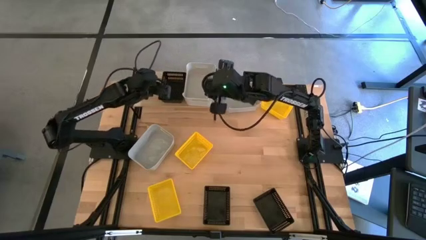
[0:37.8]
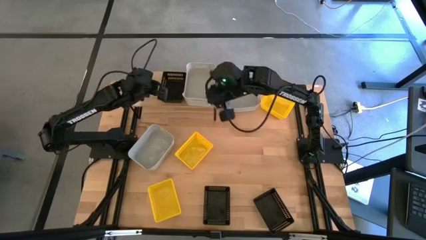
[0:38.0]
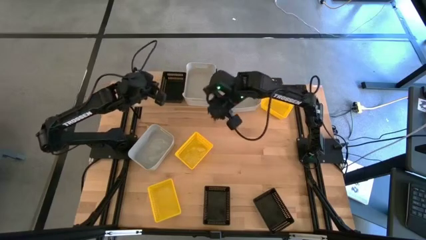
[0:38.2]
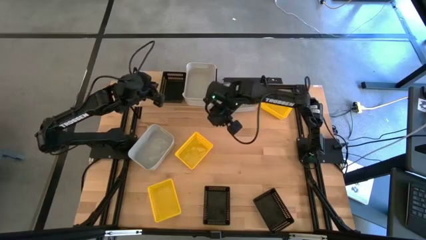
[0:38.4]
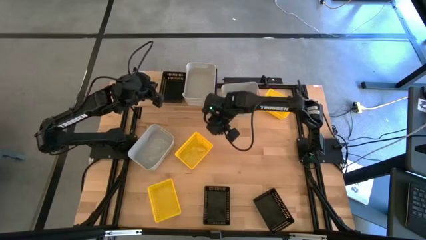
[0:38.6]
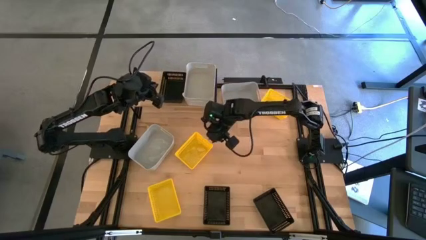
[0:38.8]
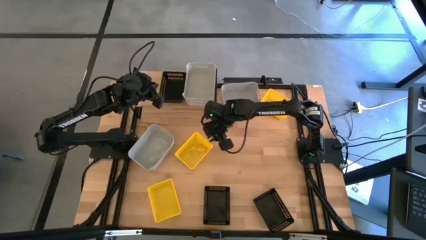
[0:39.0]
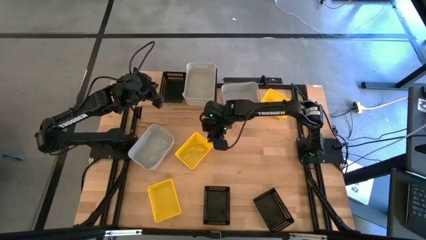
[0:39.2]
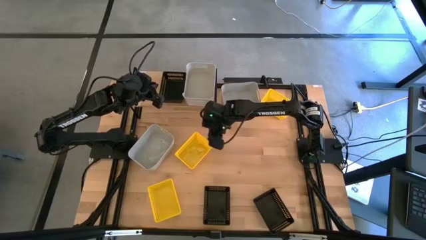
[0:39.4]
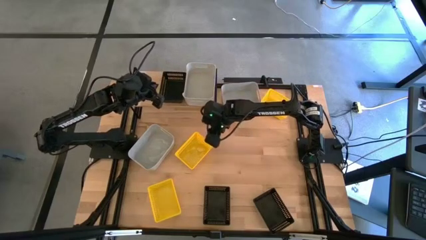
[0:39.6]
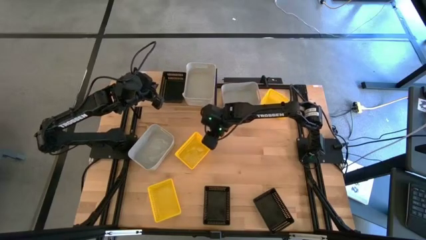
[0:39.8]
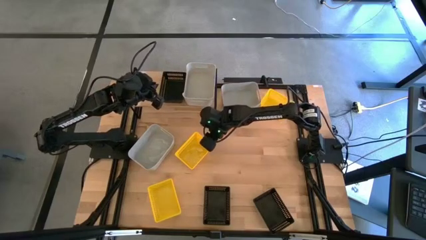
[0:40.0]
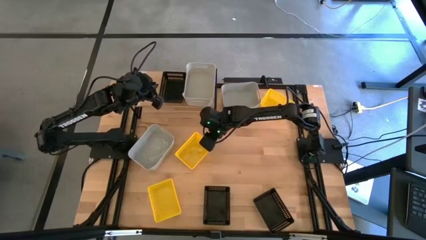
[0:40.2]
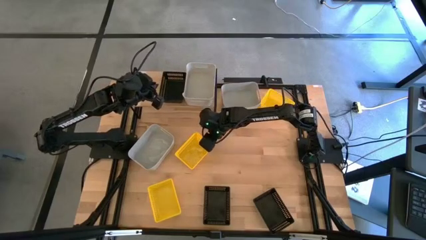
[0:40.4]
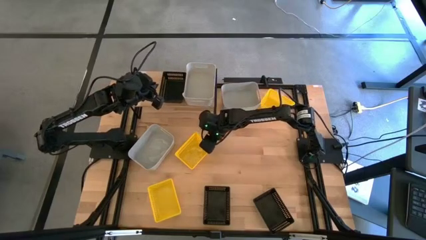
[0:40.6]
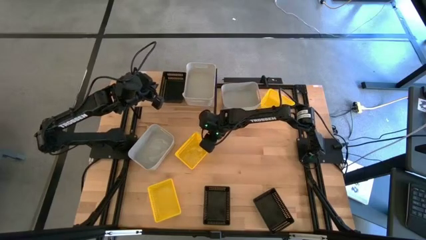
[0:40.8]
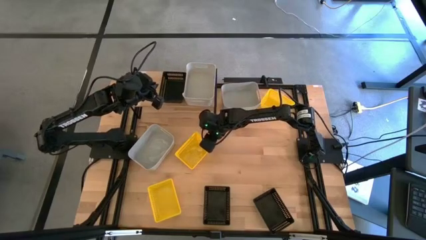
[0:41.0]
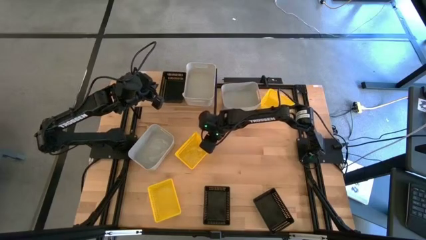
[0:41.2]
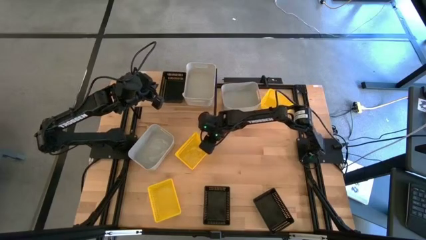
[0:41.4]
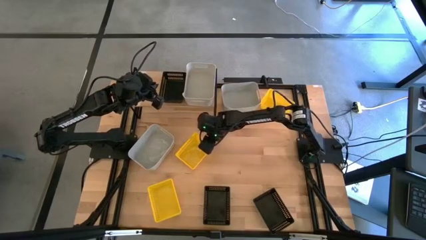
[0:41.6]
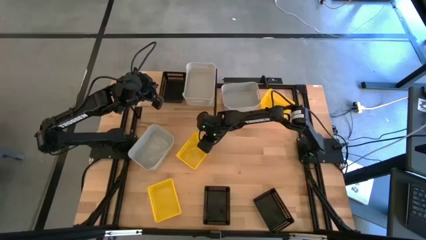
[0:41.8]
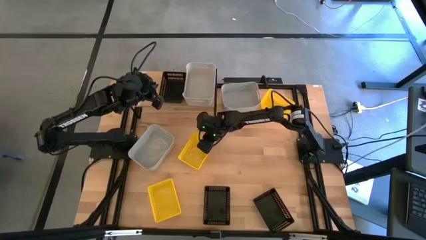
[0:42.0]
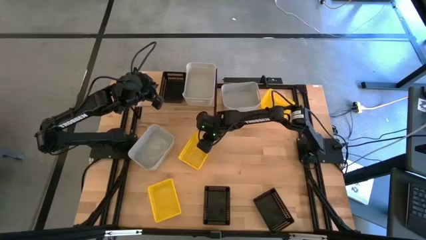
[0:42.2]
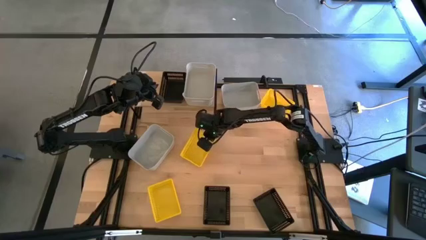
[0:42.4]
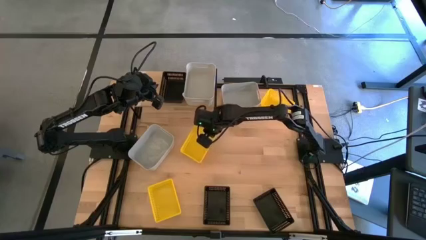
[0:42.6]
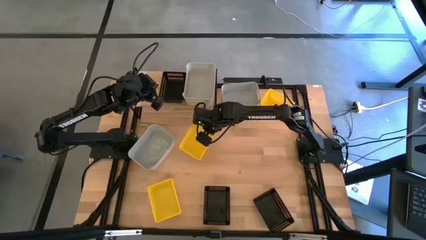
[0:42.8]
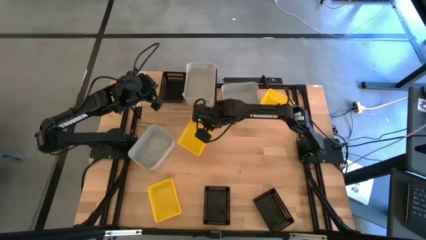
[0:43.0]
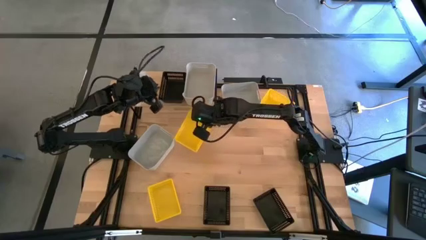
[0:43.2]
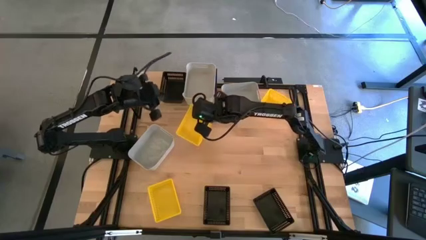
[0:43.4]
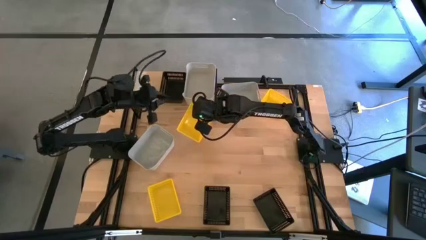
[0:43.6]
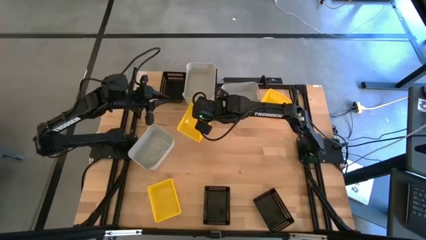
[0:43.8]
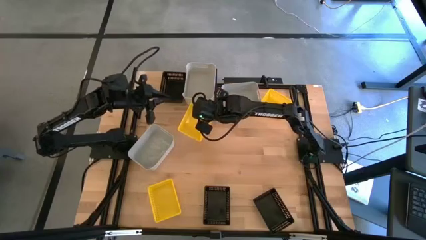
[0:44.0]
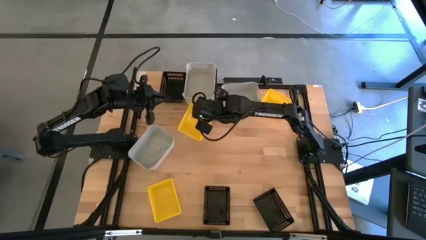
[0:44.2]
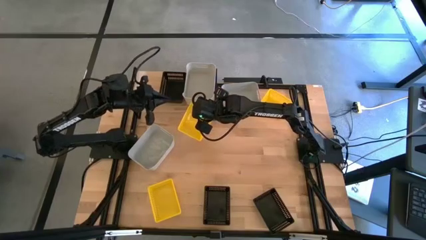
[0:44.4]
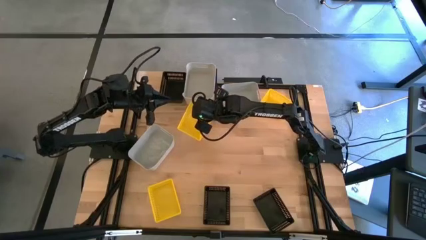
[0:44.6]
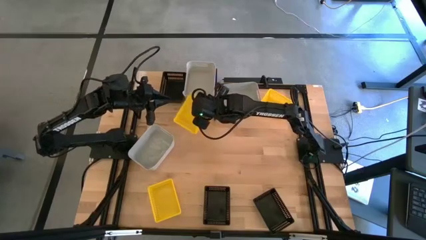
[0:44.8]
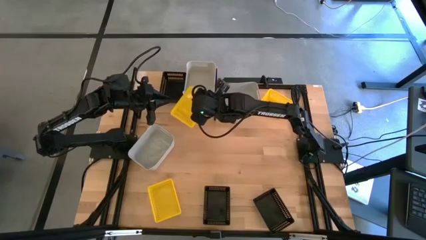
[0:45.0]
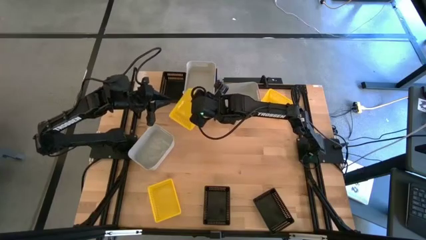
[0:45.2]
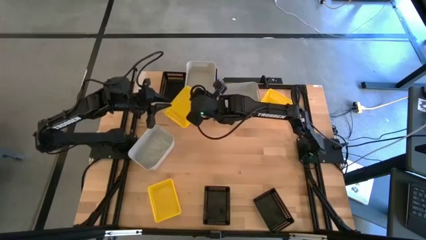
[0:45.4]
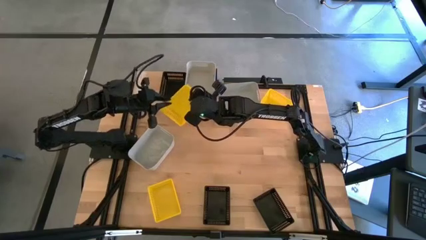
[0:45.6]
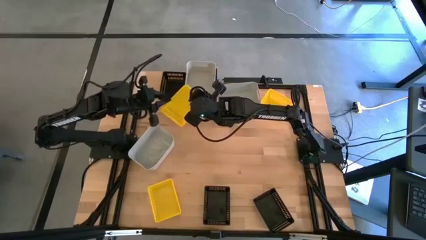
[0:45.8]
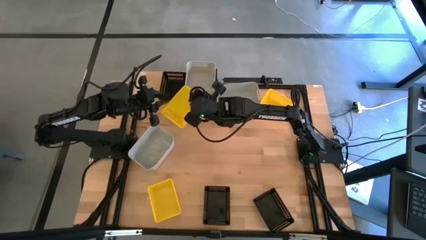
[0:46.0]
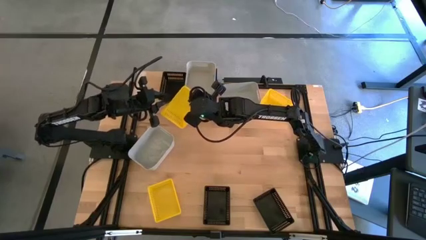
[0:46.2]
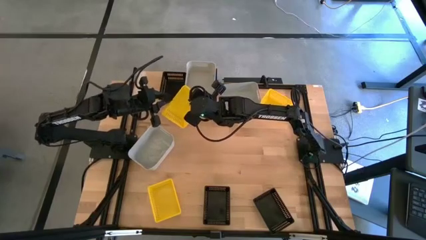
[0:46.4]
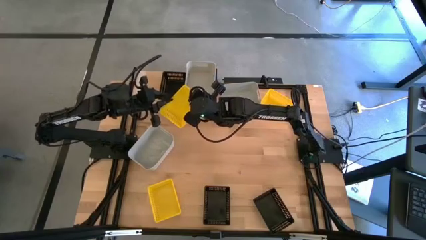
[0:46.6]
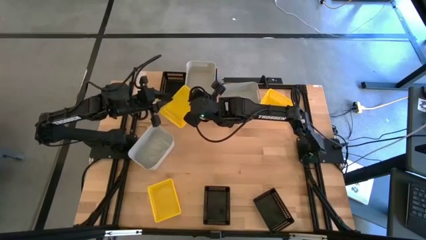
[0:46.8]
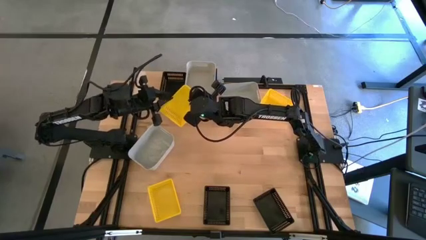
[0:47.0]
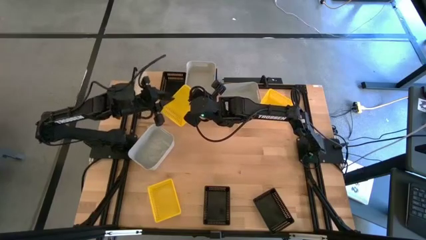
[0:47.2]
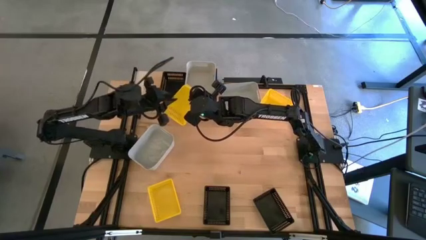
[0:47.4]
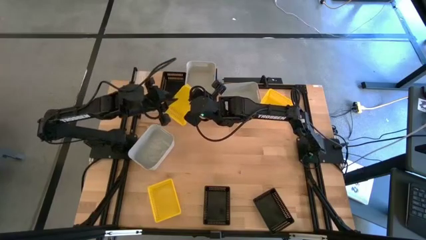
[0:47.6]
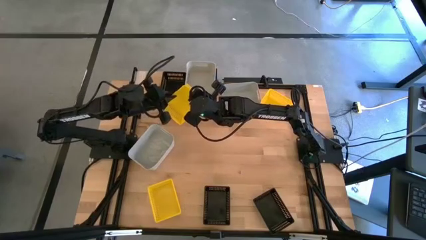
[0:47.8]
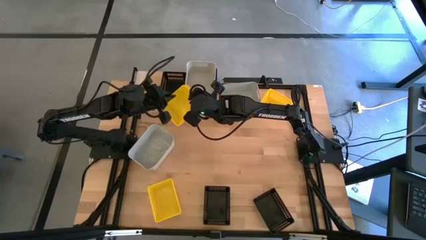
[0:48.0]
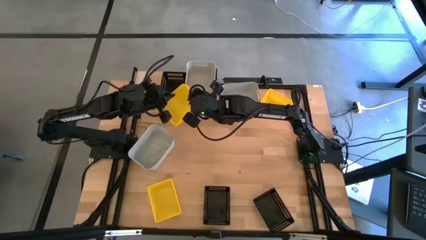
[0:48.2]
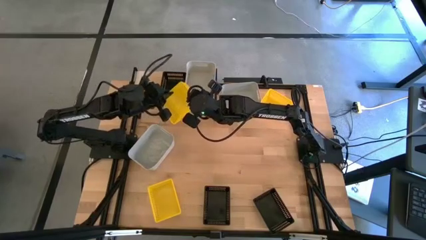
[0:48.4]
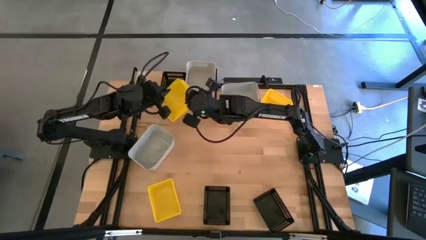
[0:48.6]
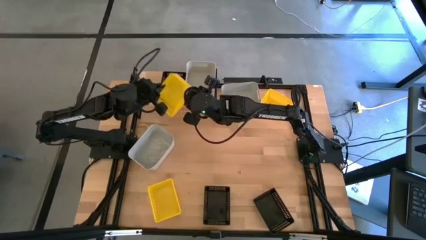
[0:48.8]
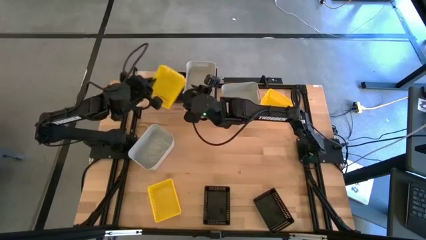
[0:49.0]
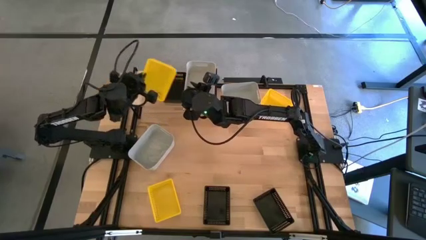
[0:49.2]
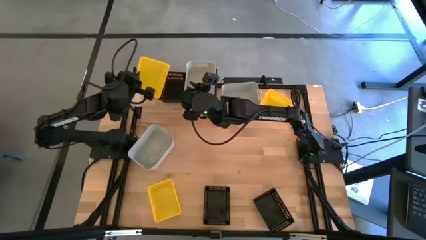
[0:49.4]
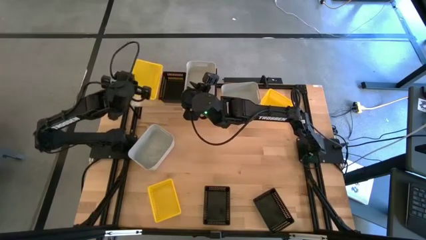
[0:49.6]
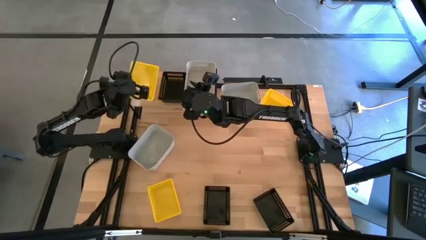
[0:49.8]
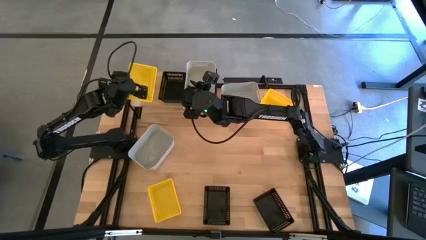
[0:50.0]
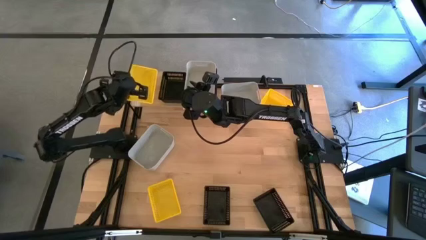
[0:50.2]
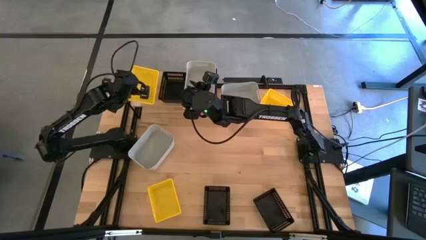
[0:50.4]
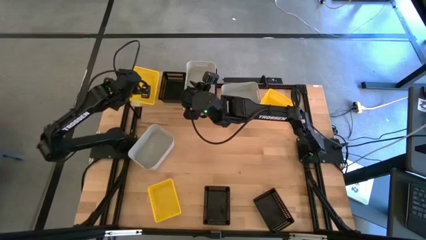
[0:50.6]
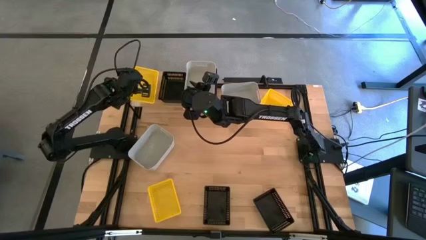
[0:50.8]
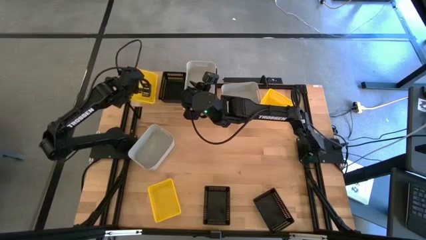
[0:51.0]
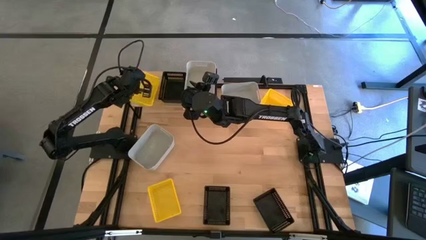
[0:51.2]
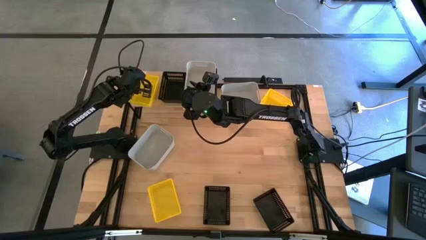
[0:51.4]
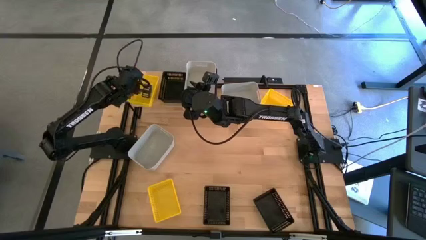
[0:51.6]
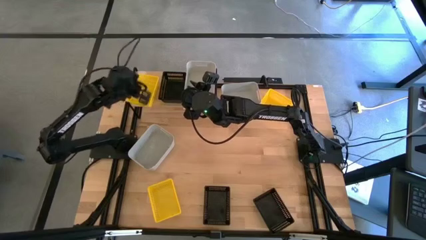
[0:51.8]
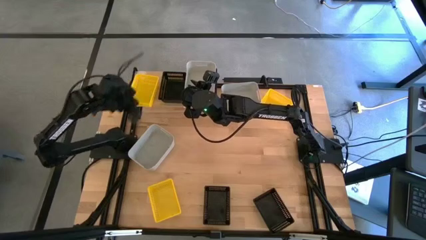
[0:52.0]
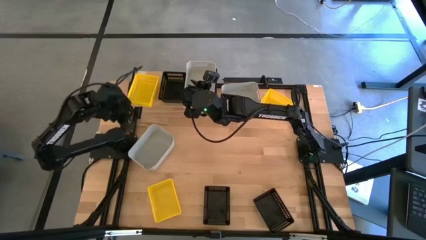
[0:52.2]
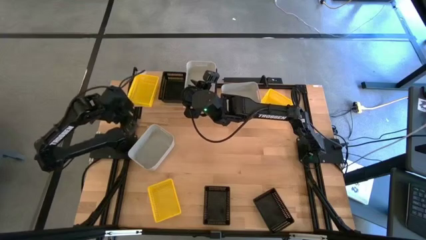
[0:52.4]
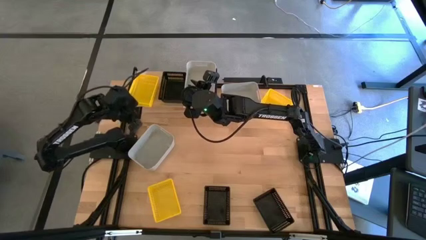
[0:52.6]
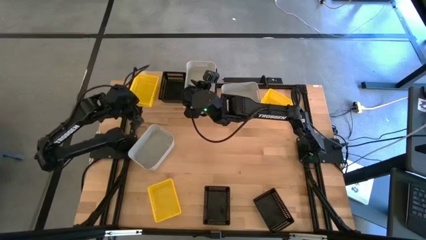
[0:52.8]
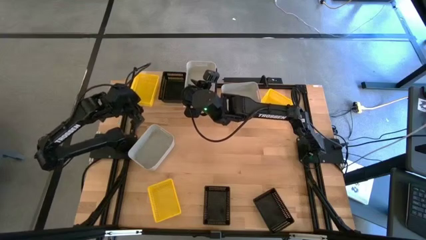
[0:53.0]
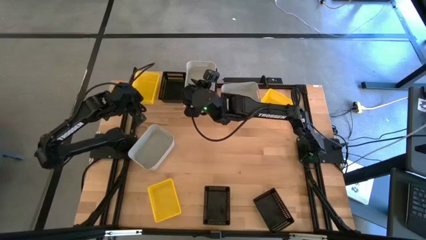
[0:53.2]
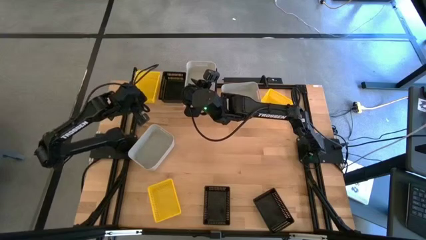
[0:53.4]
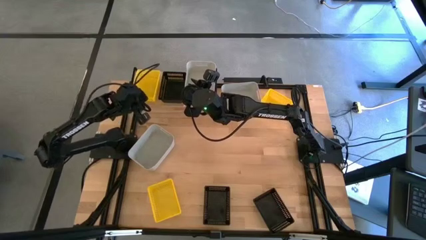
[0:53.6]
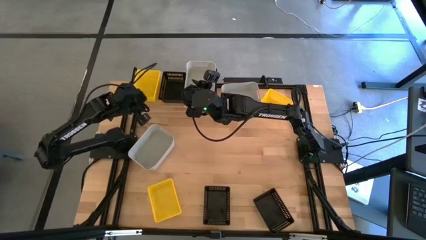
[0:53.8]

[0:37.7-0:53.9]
Task: Stack baskets on shelf by color
Put the middle yellow bin on the shelf
